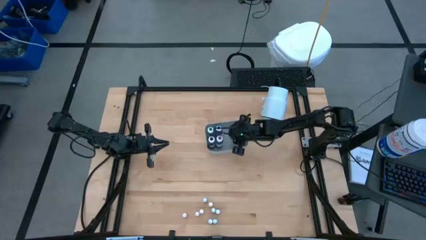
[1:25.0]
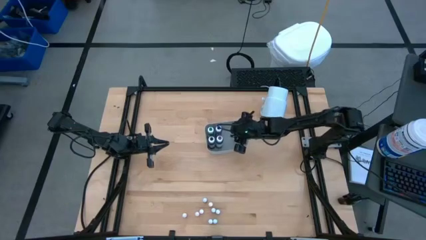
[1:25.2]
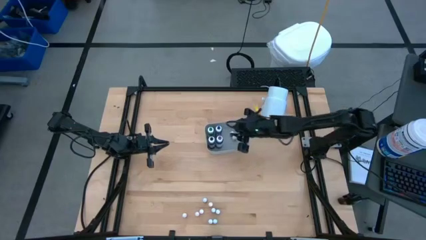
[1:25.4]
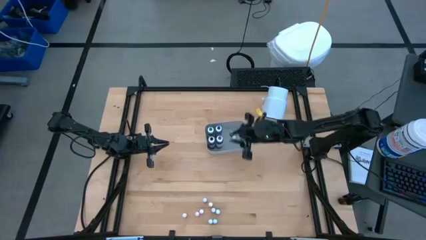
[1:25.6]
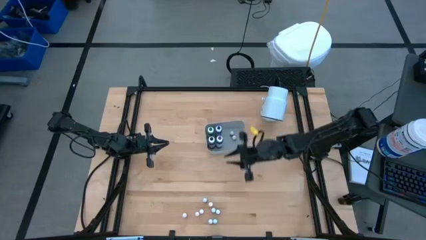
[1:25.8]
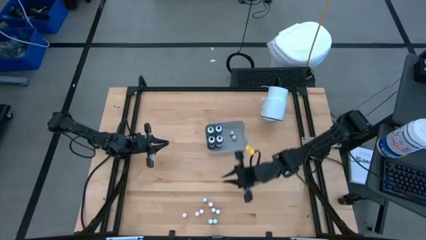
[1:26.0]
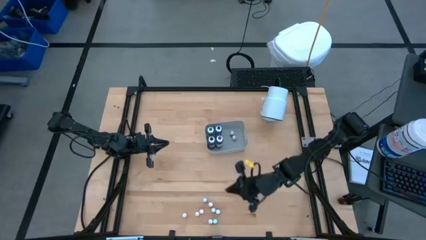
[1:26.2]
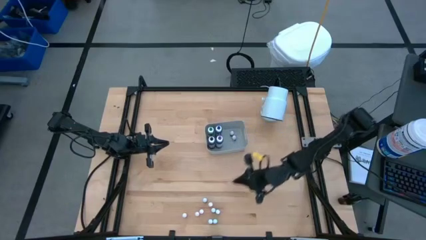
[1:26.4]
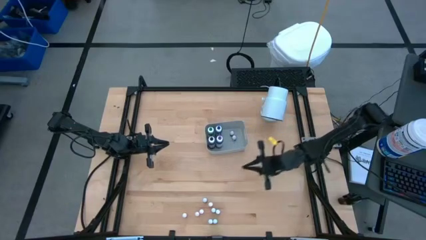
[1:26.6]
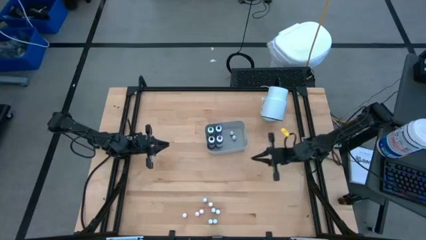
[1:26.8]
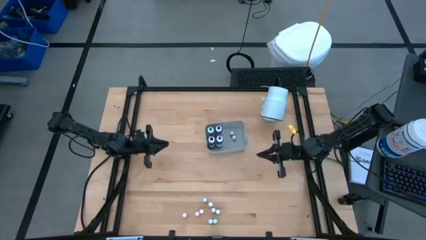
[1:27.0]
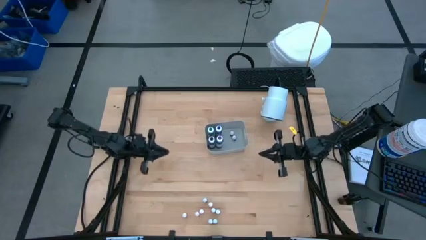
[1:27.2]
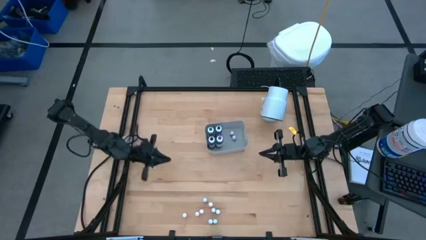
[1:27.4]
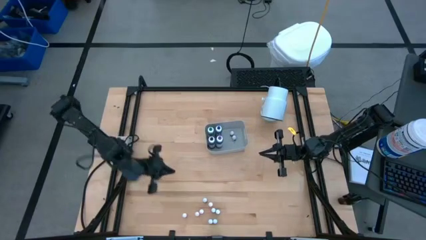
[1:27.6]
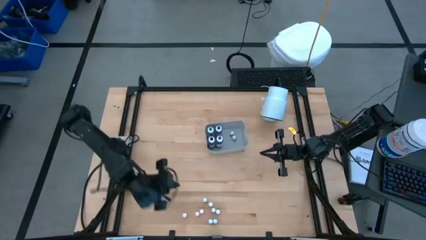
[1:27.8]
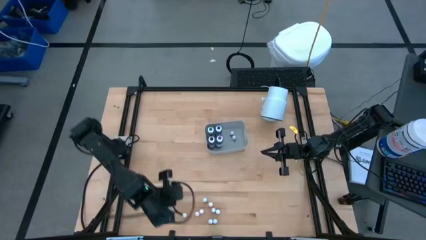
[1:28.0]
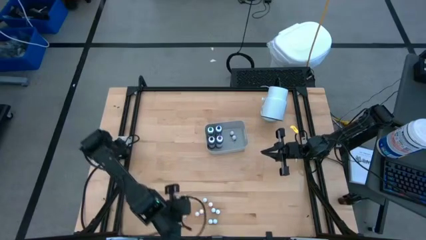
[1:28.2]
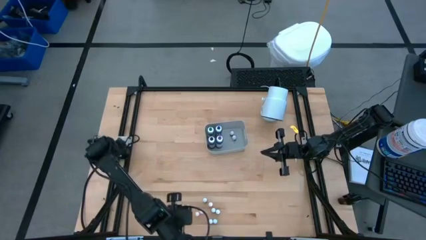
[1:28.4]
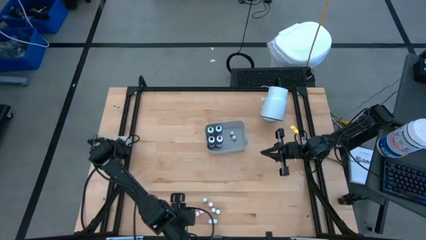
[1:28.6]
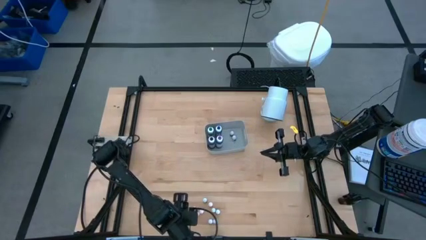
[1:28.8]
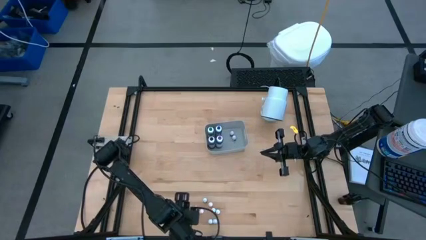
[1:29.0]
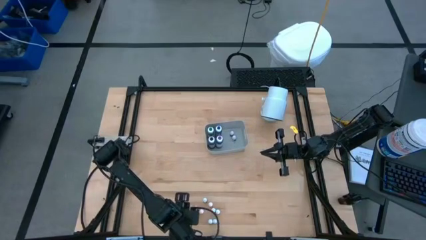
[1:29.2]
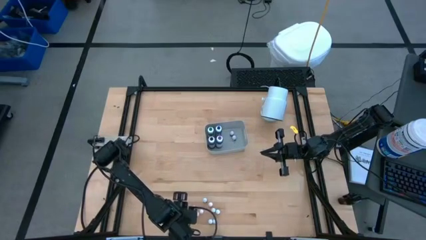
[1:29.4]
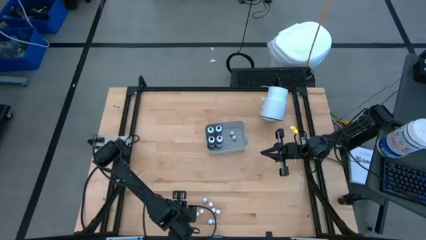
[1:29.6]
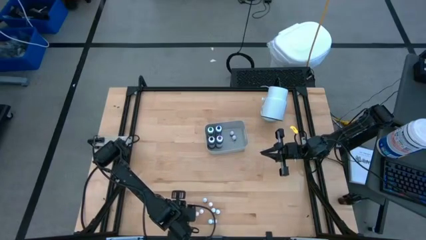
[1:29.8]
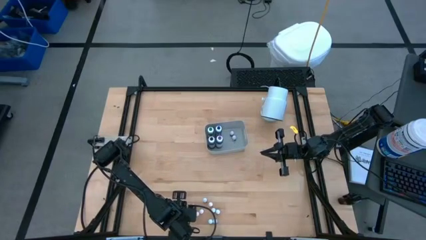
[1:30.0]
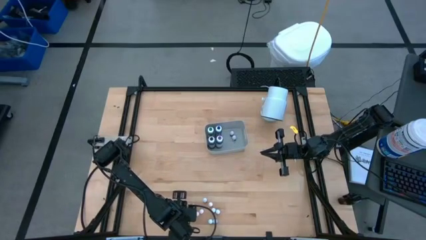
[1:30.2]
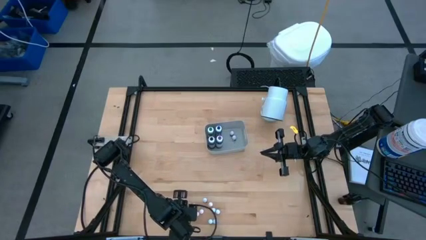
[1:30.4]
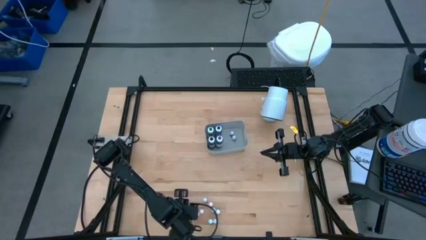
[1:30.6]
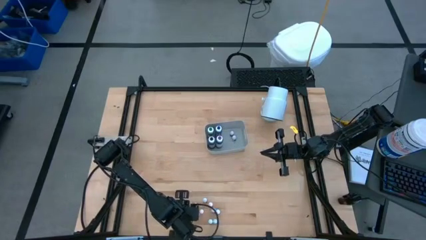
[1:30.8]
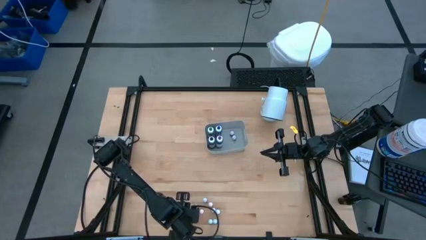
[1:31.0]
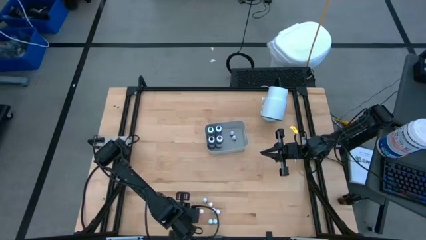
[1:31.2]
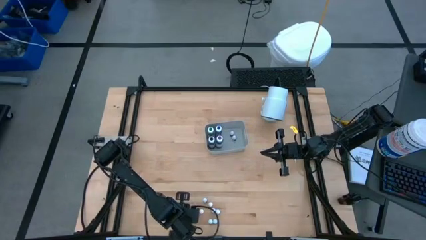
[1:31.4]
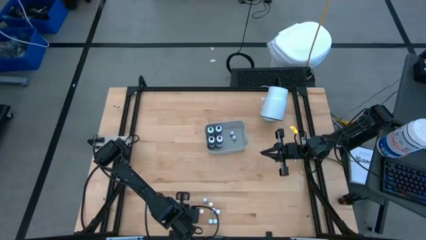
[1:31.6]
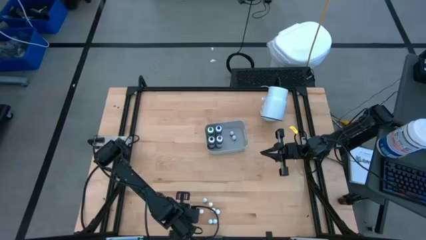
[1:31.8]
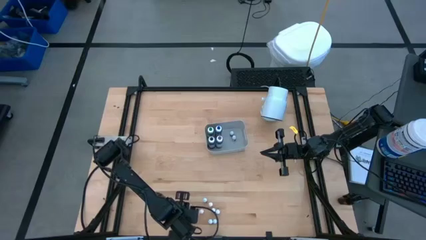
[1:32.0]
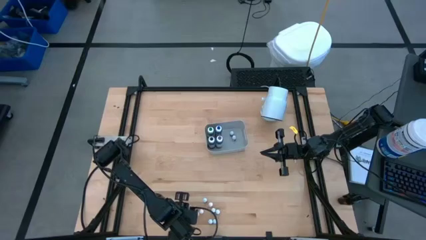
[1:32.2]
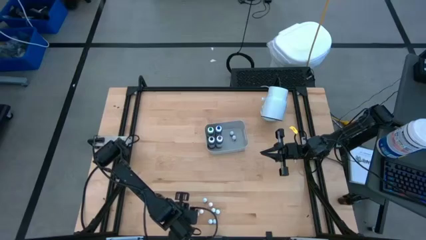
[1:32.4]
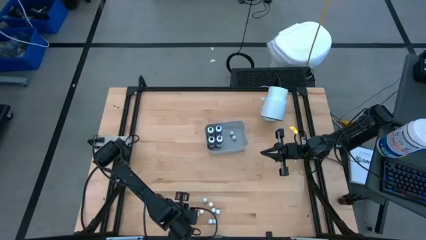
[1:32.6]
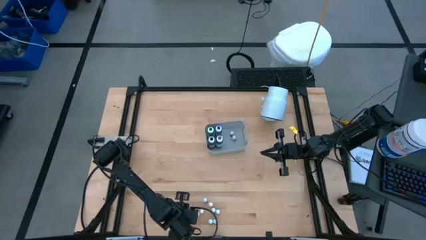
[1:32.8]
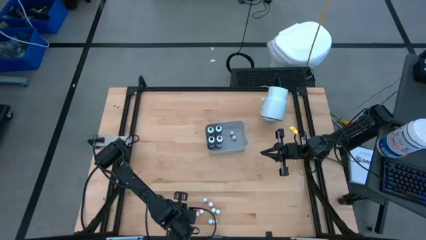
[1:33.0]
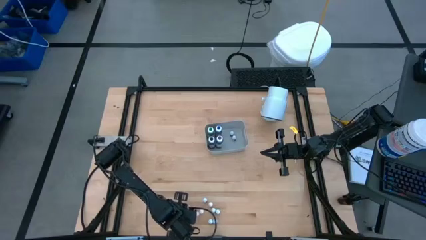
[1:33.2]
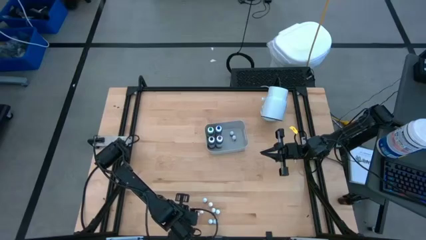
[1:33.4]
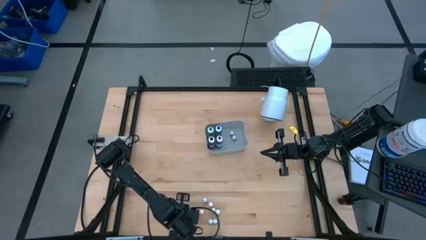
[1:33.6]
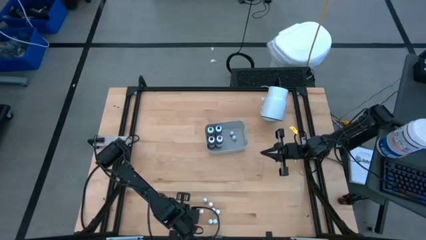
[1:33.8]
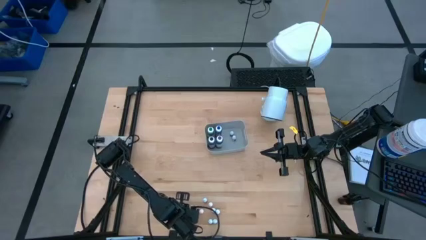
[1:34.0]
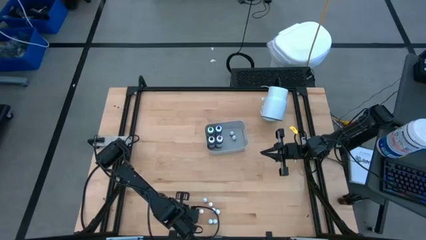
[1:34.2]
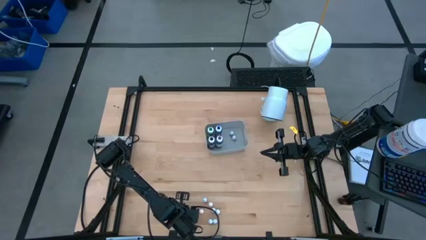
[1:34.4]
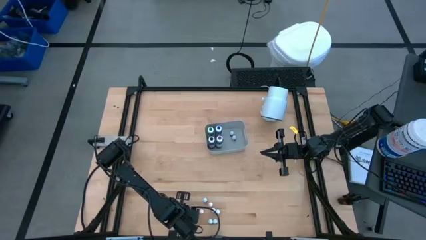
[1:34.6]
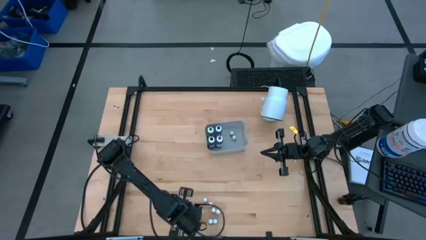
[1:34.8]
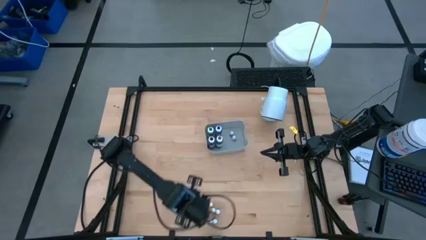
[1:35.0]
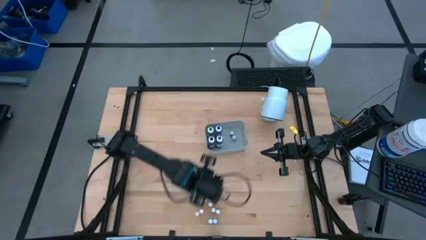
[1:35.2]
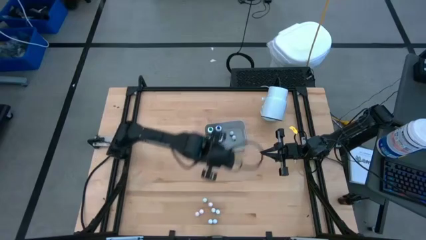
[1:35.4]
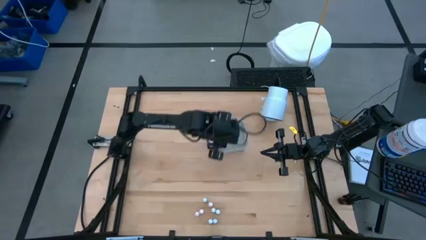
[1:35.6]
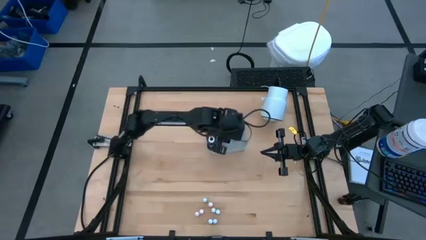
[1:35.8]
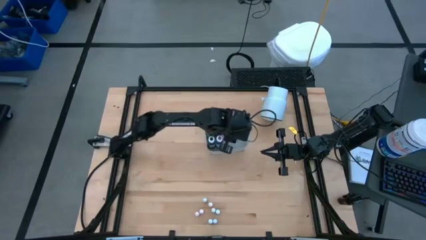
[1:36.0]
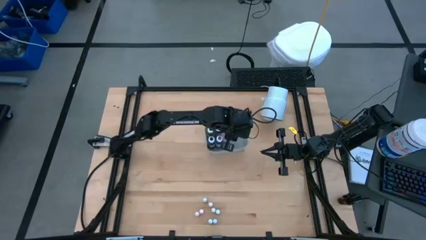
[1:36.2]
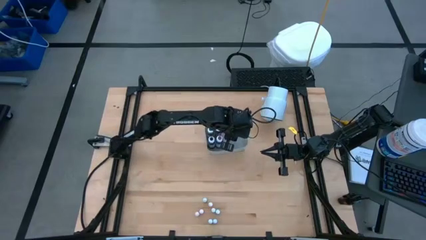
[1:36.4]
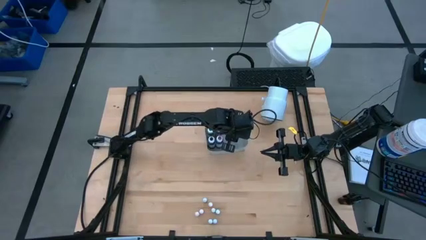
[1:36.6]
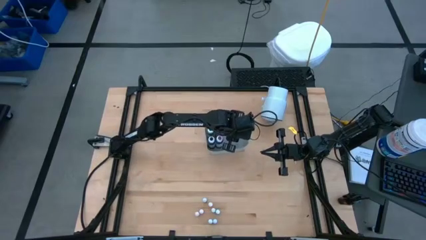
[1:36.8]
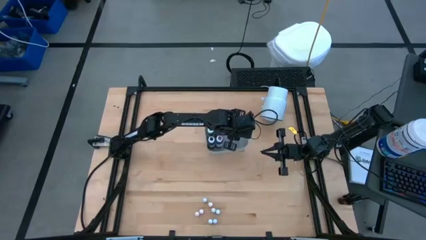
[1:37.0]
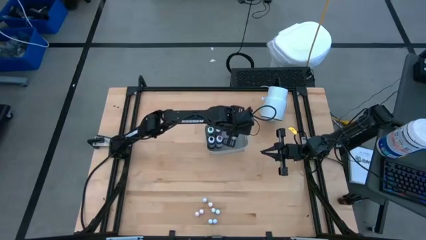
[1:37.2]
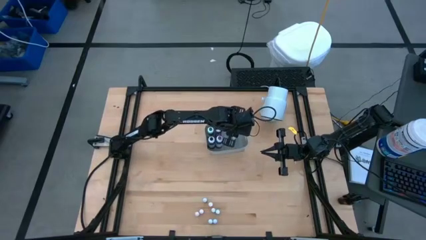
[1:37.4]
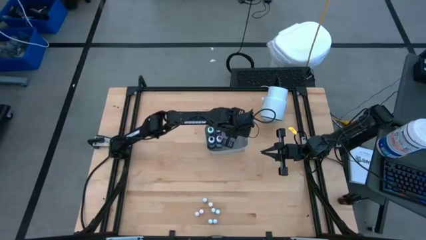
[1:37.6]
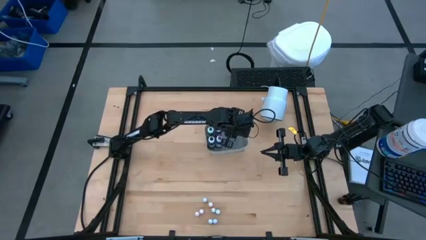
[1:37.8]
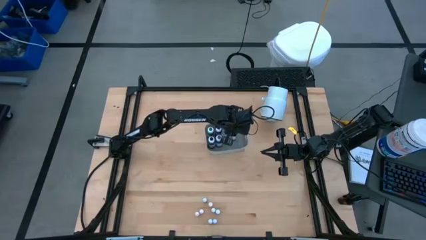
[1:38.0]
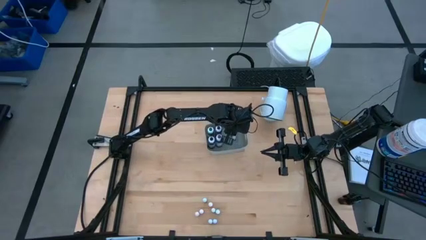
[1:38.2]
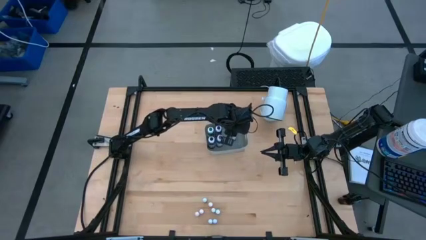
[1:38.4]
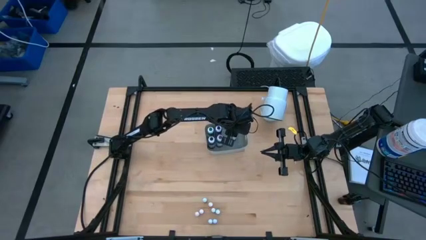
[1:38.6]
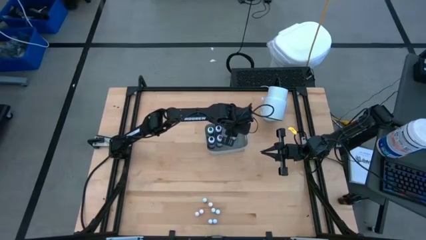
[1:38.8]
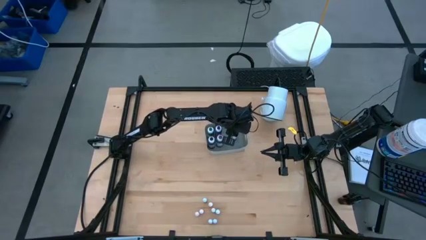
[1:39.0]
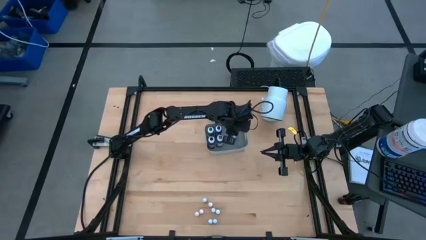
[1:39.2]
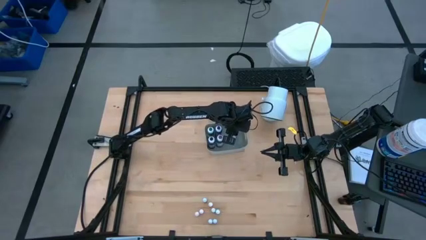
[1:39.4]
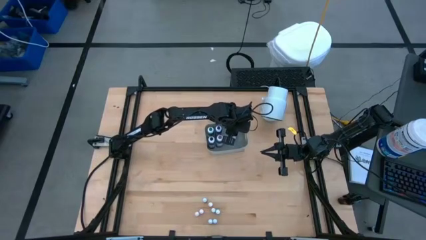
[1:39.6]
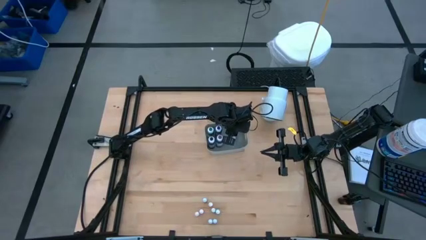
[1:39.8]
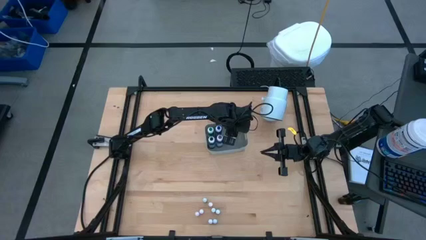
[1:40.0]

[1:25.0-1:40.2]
Task: Pick & Place food coloring
Put the small yellow food coloring bottle into the gray bin
